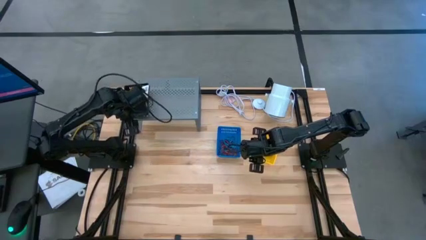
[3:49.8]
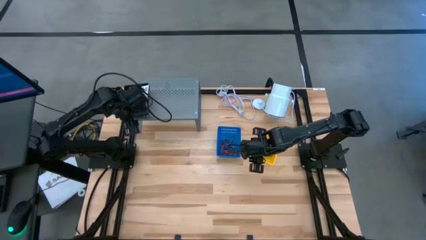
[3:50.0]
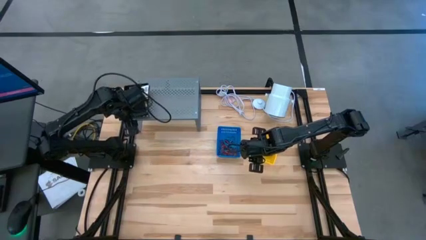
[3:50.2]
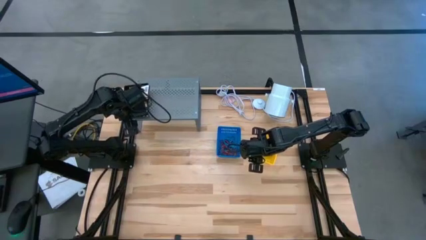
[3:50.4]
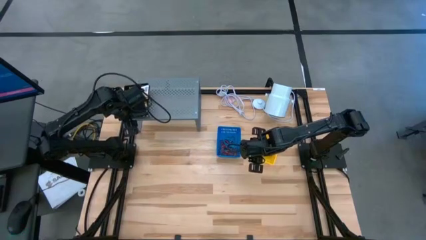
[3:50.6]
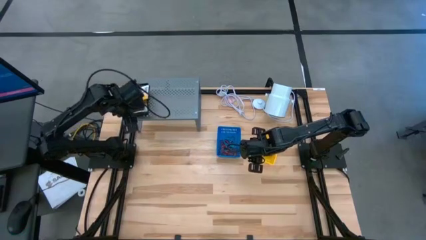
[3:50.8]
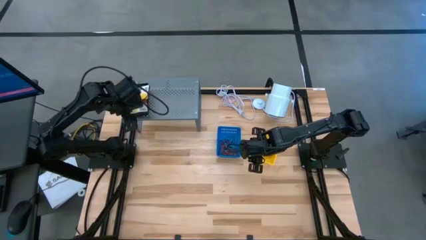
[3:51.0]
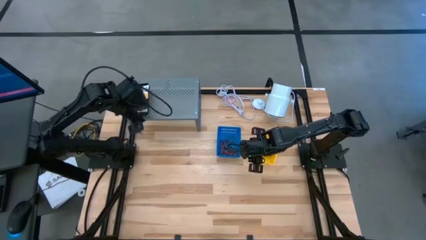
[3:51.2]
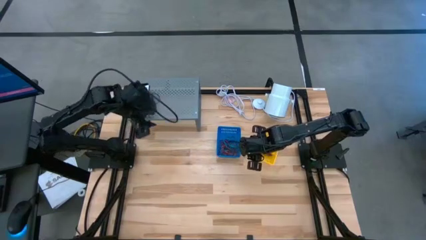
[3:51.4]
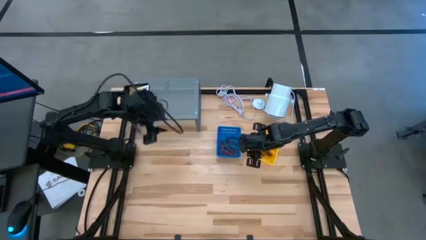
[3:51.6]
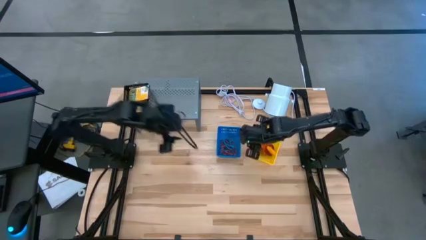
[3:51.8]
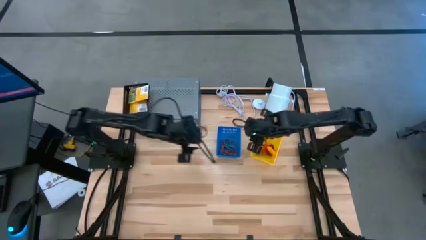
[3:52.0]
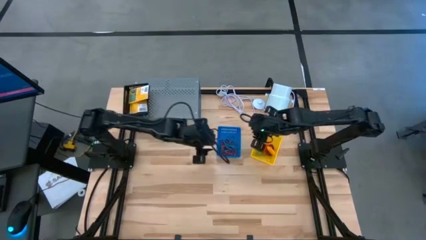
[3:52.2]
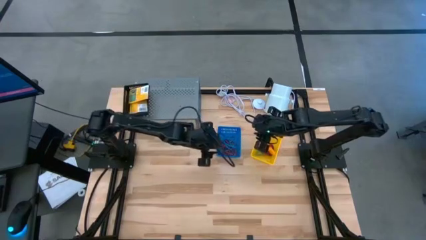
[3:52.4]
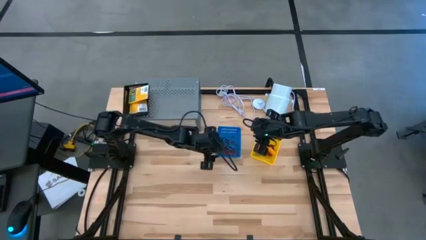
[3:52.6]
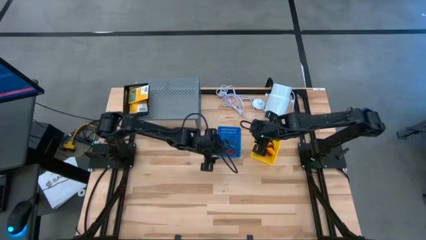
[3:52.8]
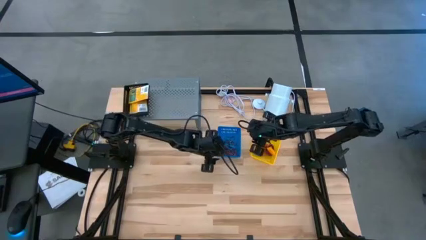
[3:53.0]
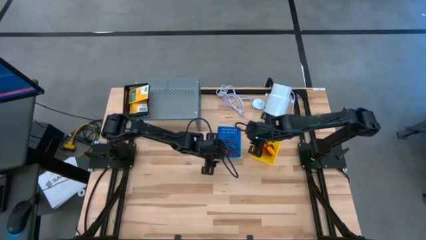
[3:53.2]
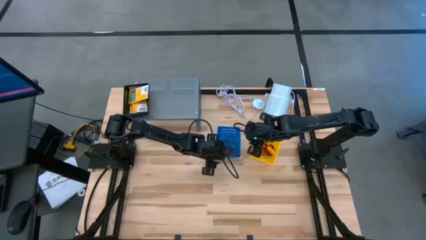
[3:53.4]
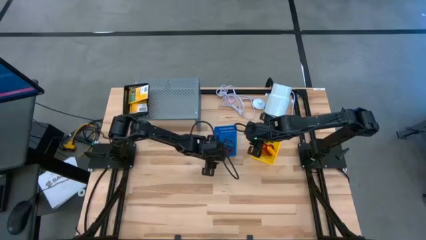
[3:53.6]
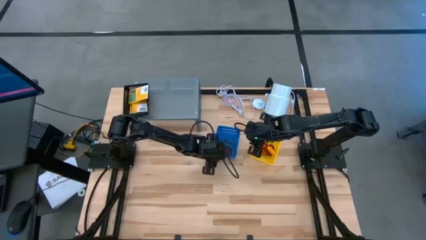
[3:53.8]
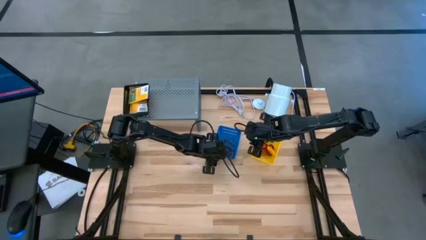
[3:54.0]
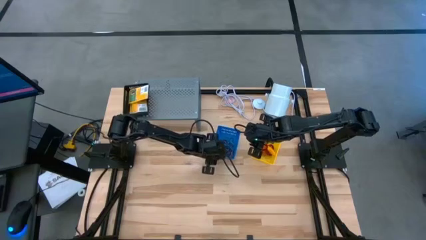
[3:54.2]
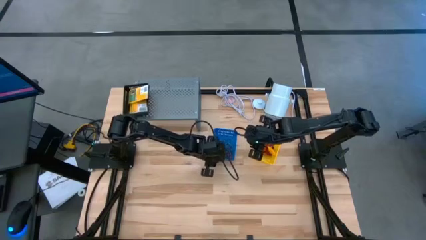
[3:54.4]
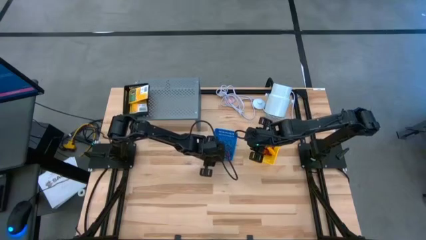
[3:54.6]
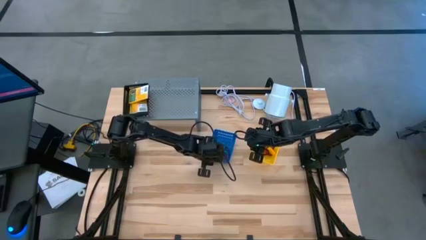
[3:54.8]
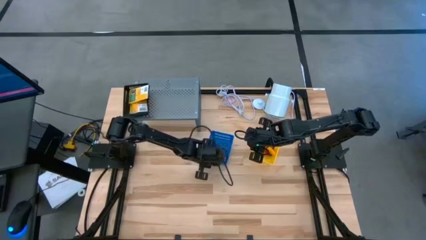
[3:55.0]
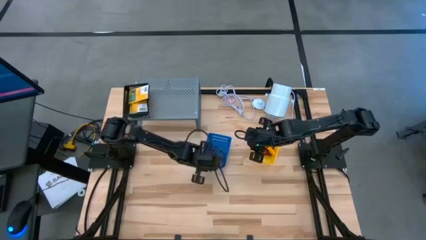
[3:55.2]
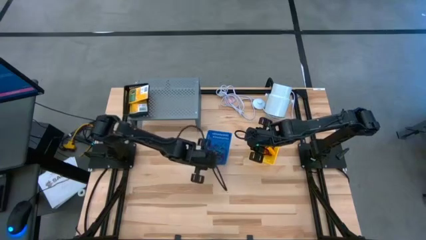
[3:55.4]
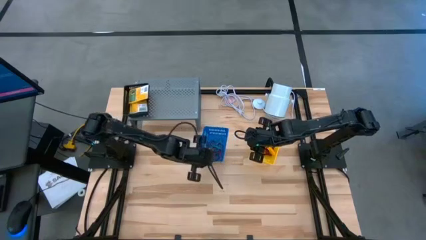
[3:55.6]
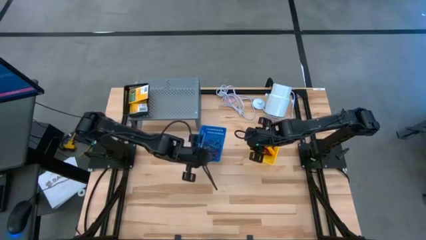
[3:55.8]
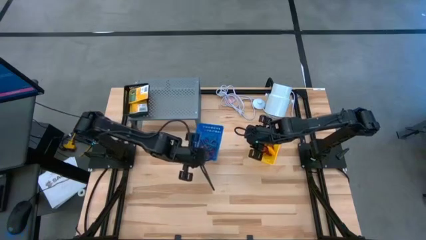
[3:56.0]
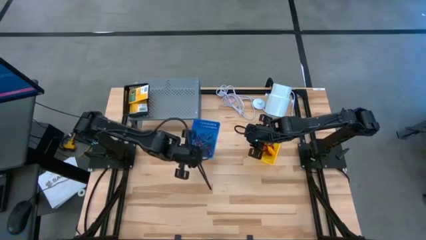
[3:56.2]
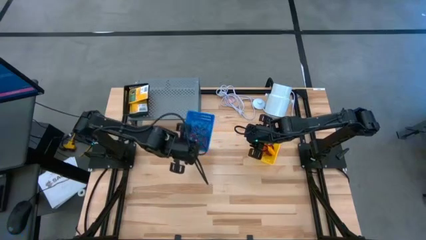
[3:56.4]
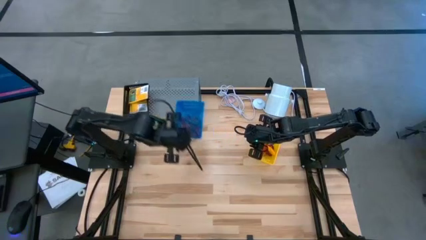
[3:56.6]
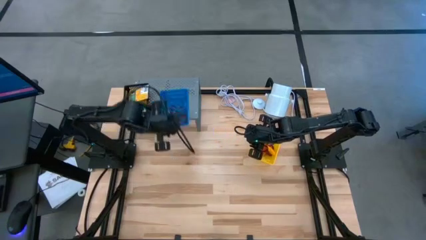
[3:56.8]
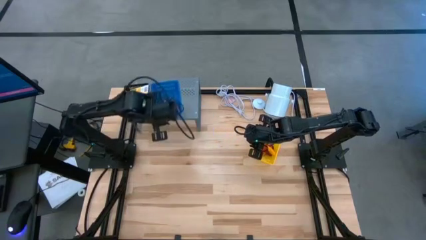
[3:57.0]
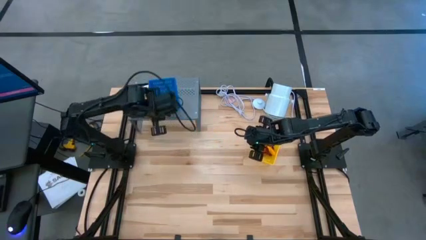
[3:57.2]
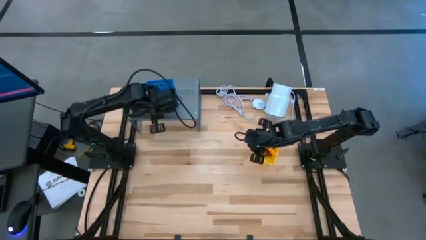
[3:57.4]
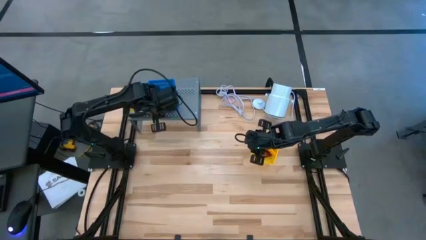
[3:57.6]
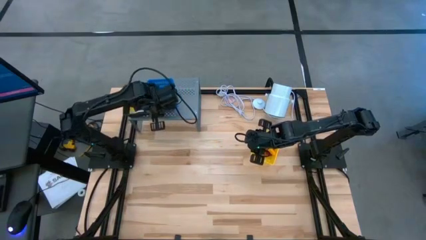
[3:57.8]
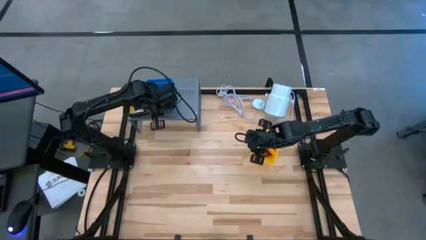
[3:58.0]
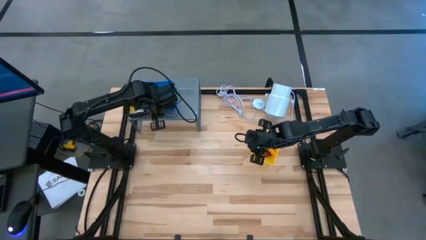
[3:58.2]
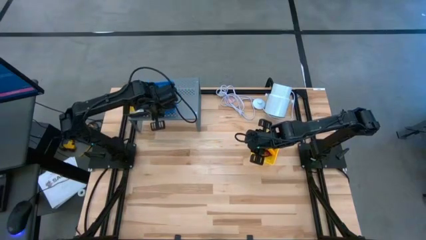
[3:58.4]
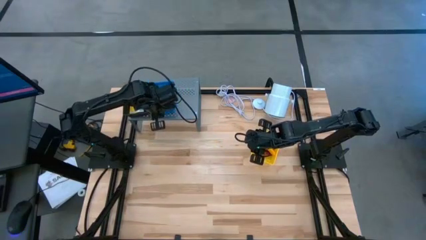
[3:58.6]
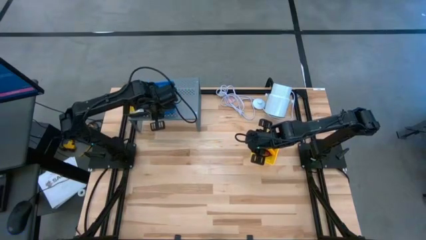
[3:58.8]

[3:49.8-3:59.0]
Task: Pick & Place Office Desk Supplies
Put the blue basket containing the rubber bands on the shelf

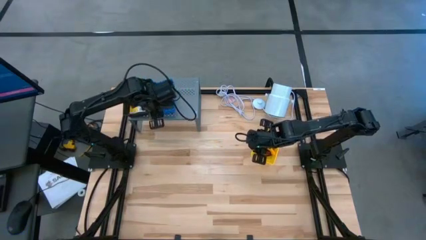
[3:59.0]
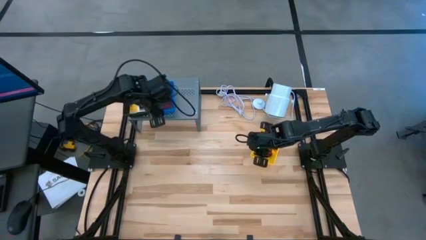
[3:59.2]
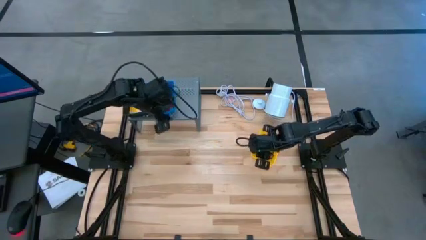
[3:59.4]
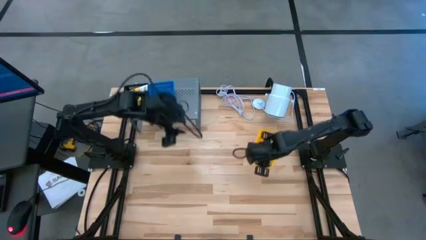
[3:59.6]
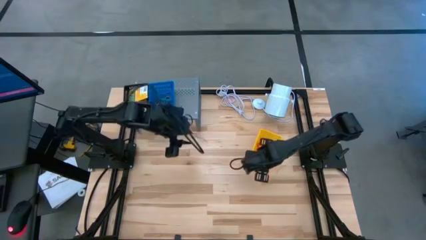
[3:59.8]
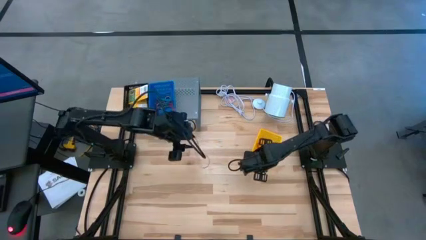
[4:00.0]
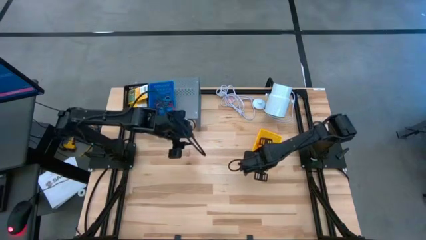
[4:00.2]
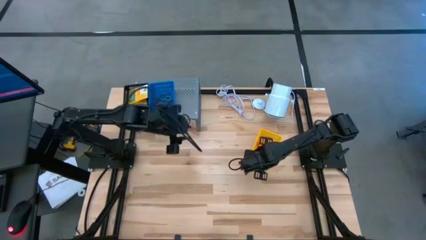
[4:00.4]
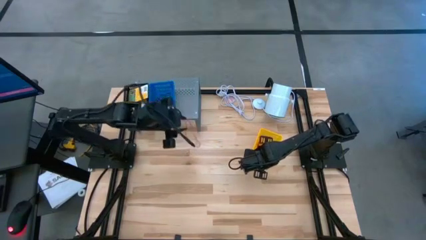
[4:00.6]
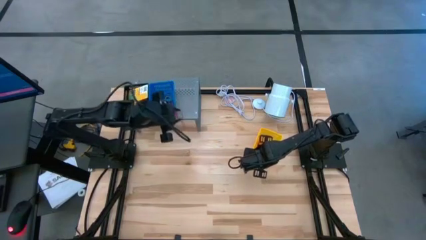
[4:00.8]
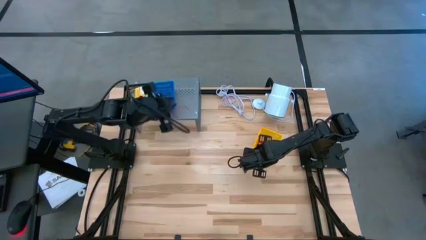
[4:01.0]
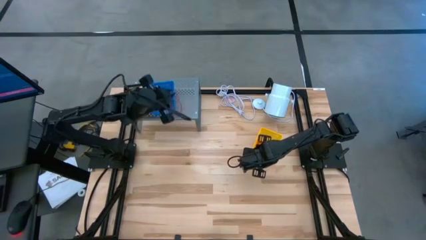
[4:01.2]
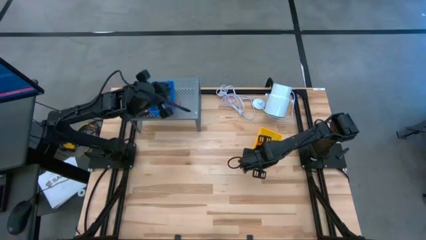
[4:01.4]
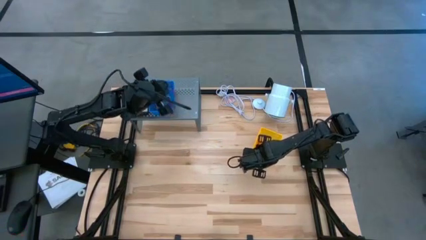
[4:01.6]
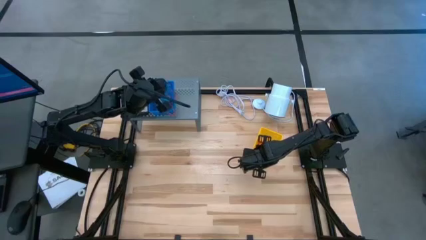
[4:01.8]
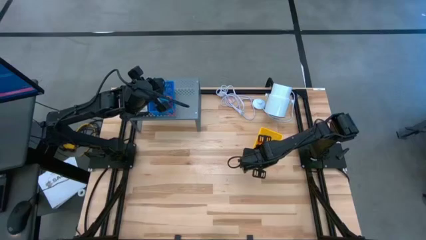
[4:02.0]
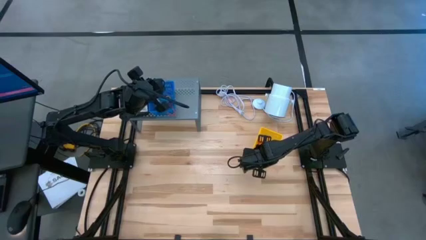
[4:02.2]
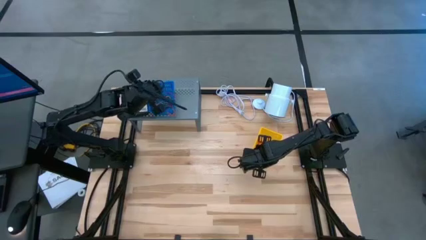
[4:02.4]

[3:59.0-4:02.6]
Put the red rubber band into the blue basket
